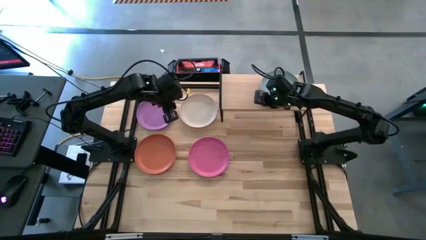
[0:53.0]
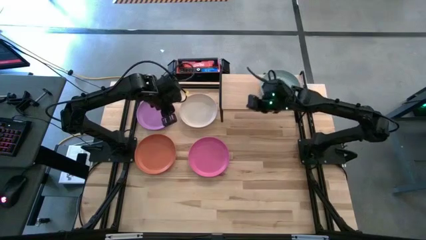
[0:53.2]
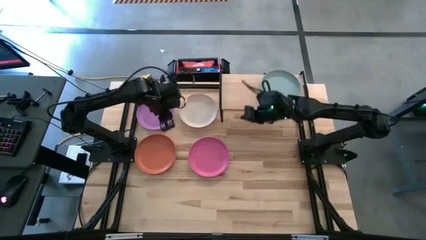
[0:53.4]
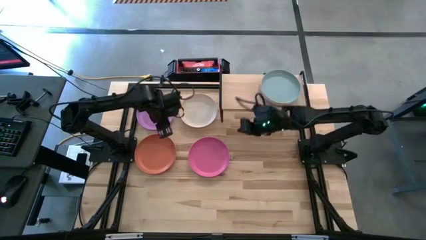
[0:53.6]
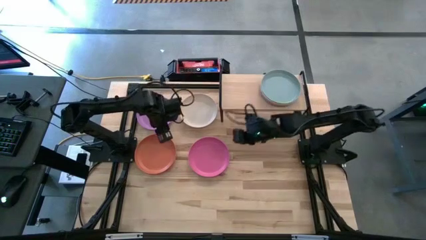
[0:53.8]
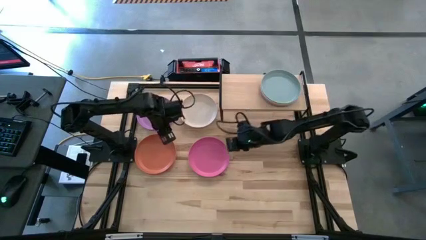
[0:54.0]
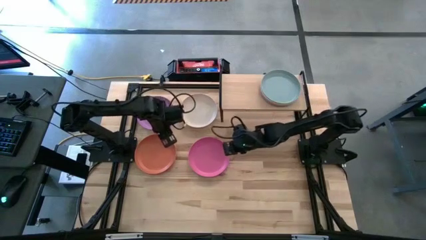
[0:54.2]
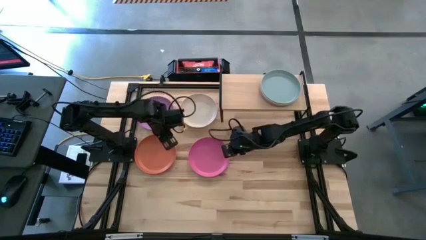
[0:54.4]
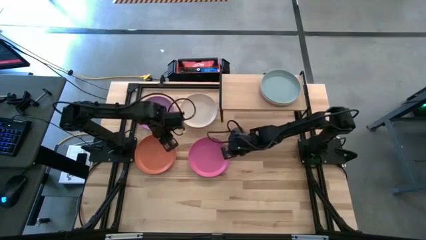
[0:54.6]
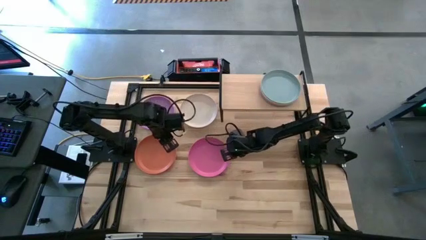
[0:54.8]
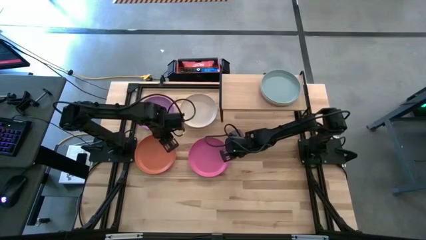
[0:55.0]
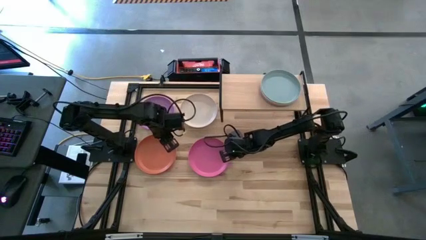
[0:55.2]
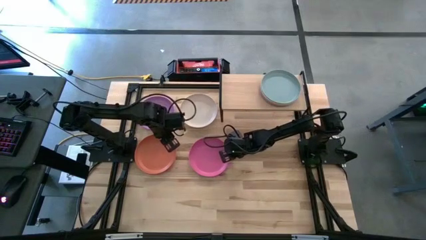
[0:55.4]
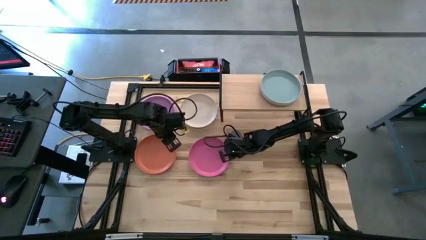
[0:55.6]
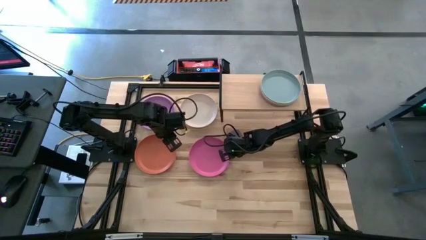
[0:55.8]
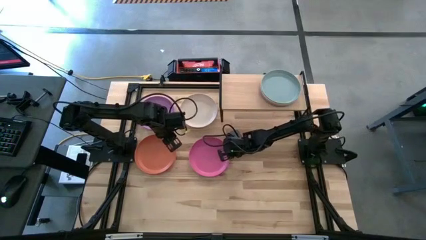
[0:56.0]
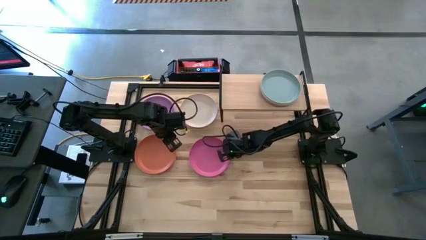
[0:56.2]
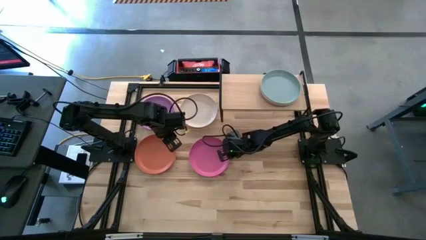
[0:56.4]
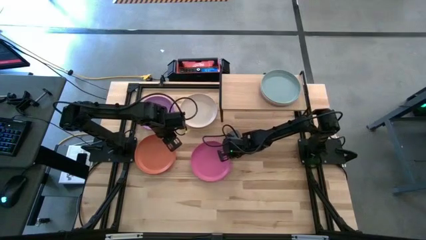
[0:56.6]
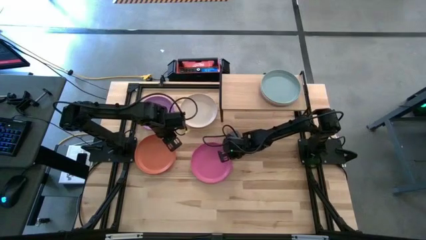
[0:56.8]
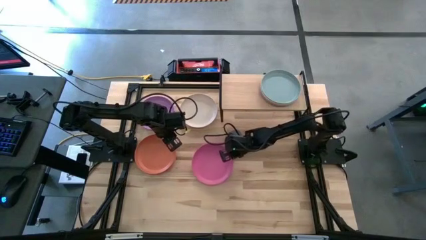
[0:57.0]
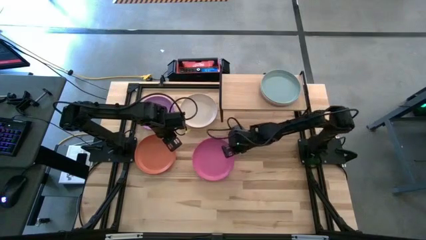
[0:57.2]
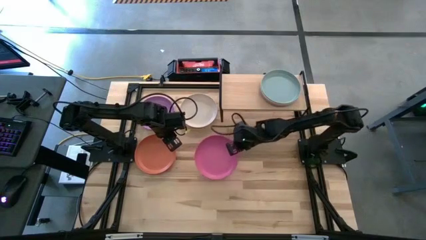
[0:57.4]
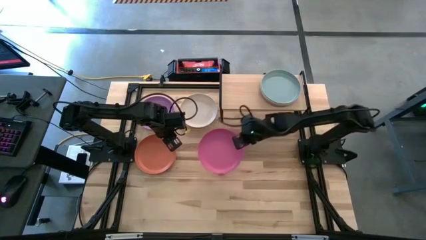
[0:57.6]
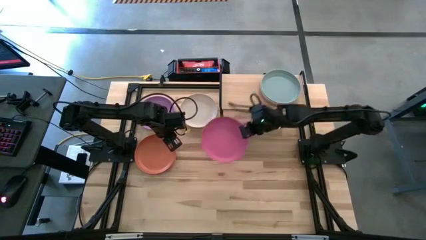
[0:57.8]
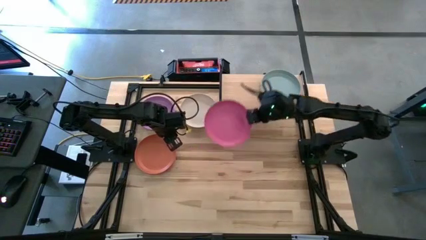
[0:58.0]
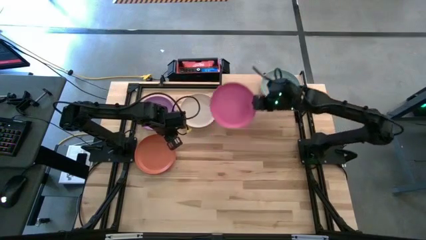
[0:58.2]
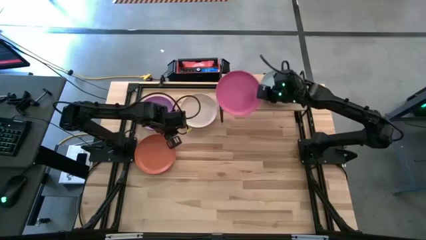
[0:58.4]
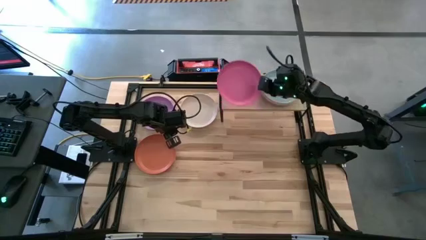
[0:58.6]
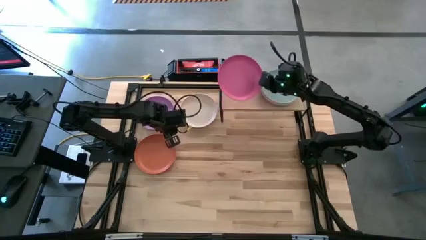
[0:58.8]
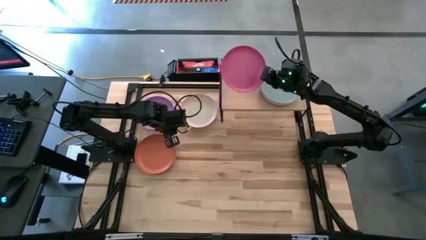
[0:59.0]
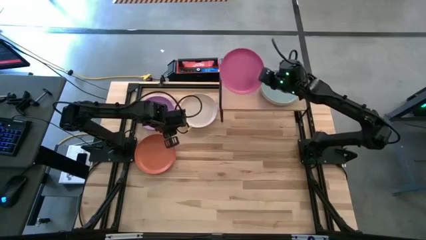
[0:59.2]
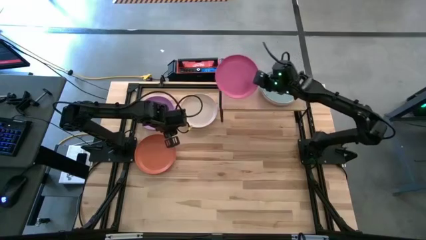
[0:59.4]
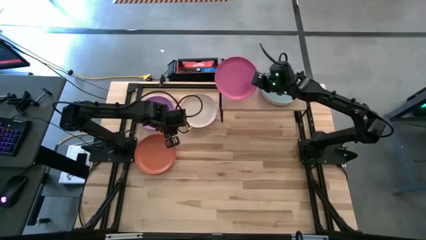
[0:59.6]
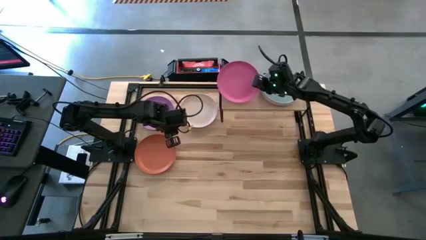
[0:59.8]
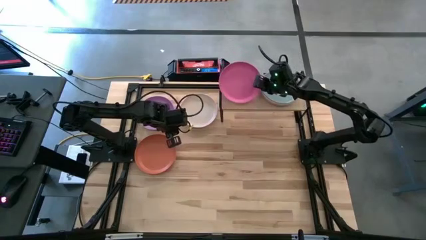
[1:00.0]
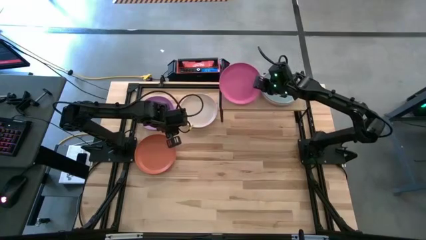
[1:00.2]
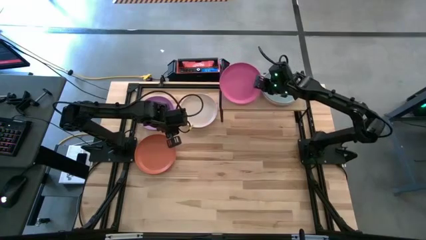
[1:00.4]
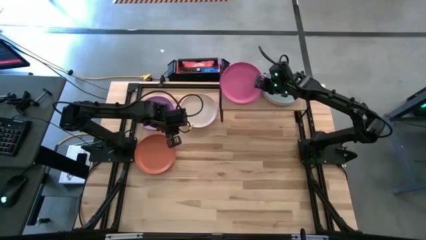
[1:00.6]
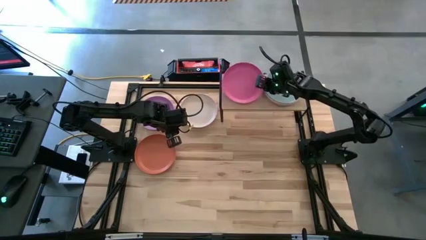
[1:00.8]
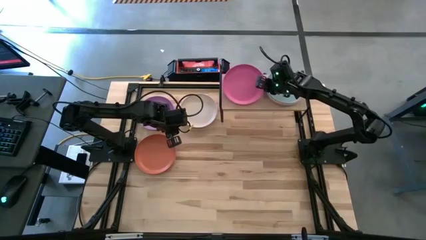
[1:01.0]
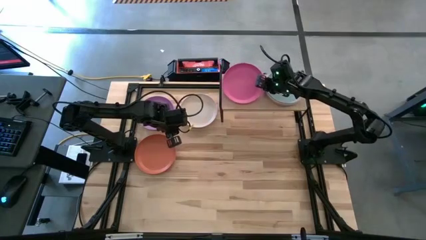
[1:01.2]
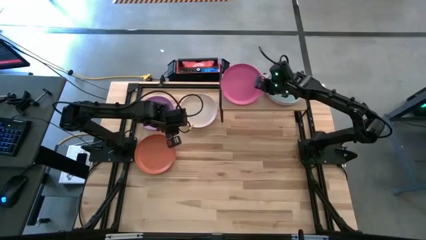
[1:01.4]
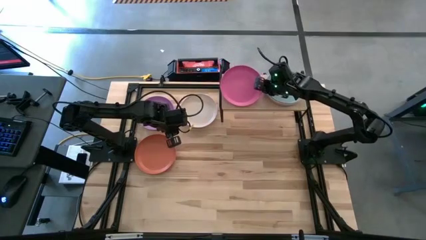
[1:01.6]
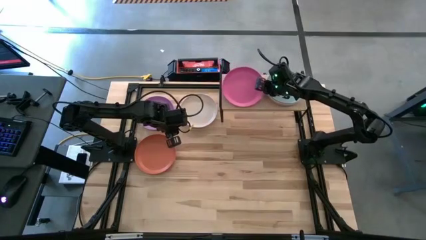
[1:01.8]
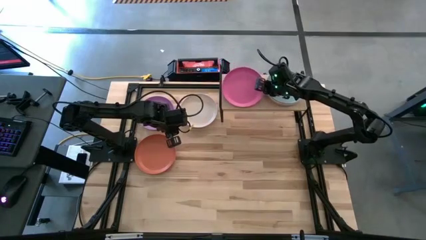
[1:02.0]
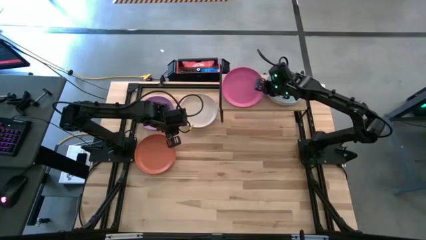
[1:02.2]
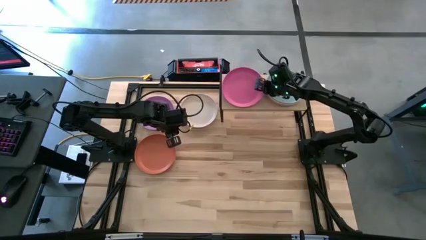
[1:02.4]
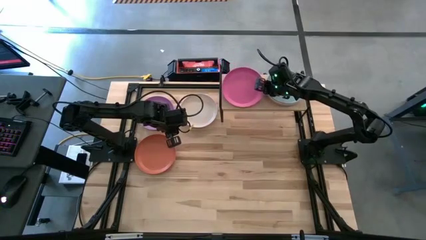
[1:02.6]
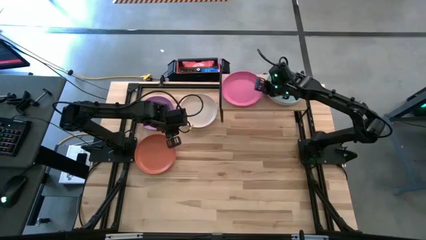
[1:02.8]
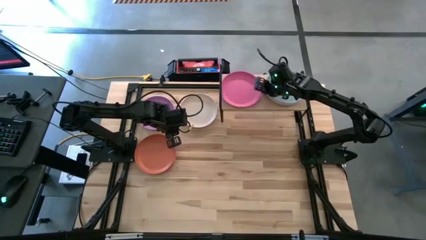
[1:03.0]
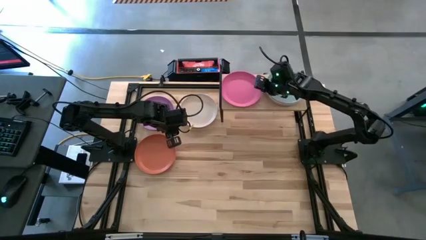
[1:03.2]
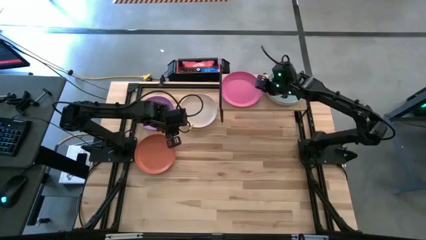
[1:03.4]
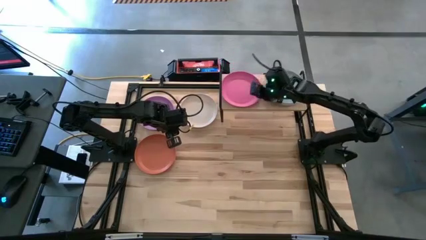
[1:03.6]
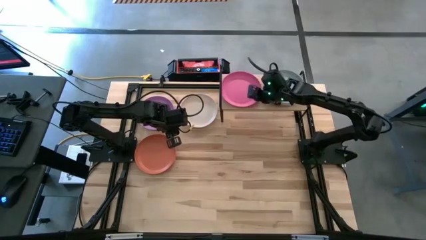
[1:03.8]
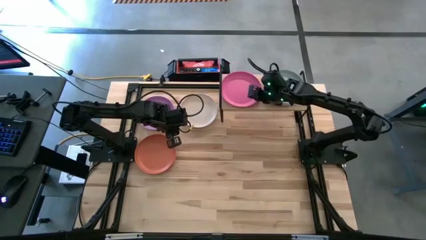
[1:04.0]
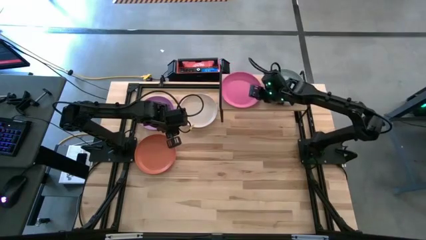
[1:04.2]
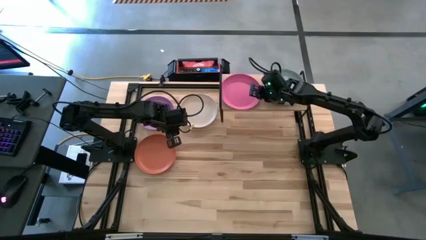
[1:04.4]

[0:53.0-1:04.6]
Task: Place and stack plates onto a shelf
Put the pink plate on the shelf

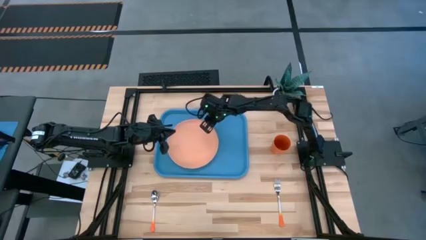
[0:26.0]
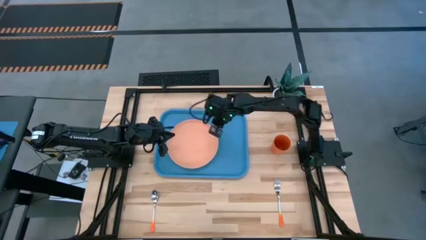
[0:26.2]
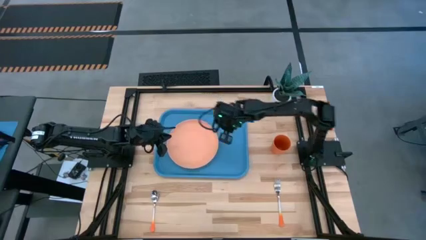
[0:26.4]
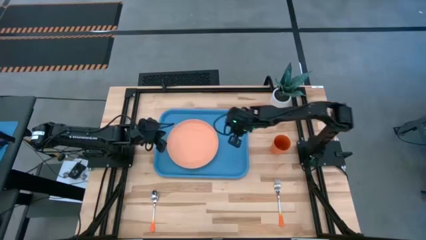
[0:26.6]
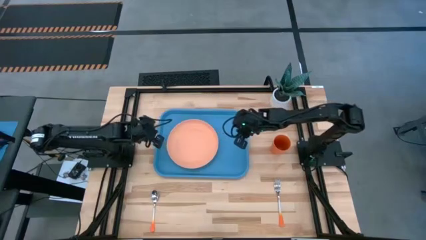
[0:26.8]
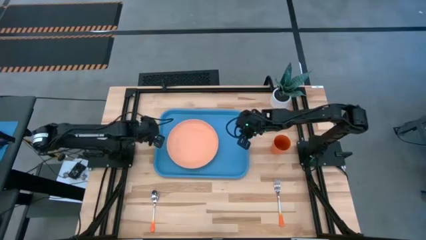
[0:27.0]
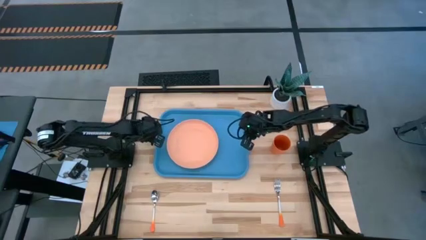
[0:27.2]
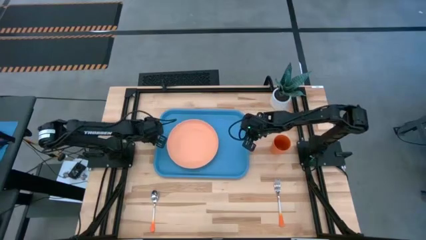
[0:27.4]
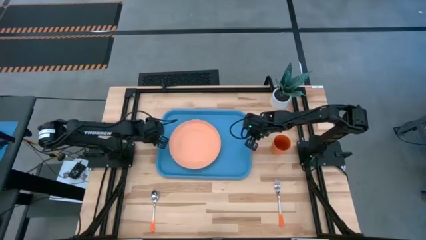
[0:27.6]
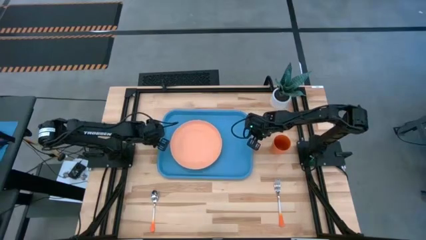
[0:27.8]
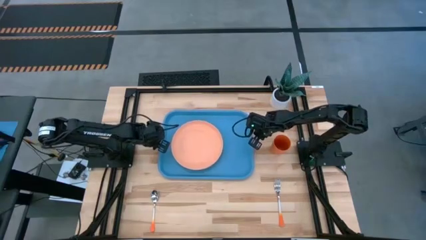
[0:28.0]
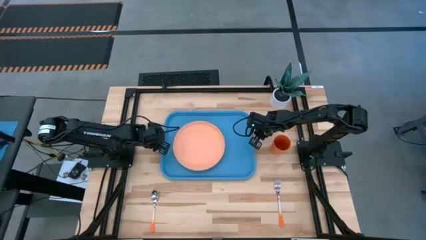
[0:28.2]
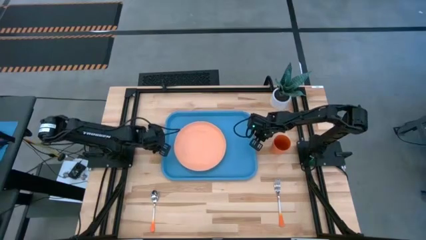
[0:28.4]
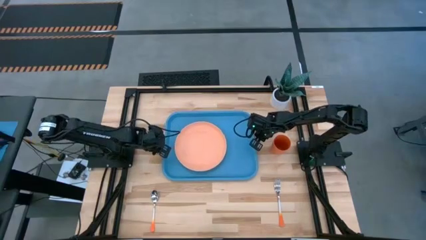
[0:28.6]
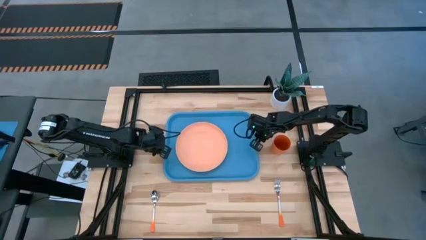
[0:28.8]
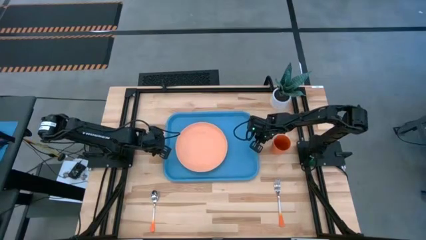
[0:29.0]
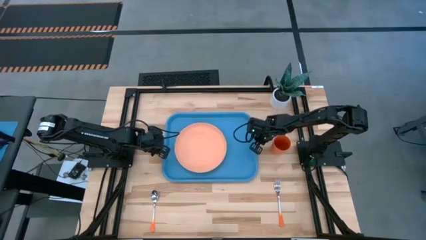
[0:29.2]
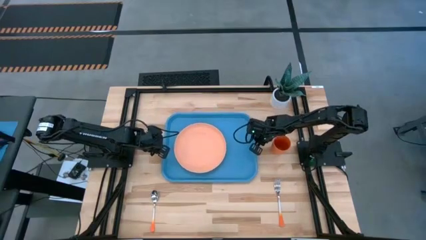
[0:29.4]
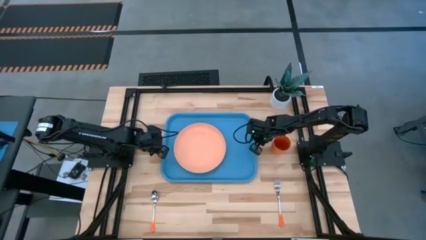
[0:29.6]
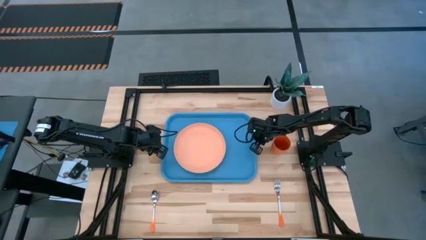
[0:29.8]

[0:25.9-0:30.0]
Task: Pick and place plate/cup/fork/spoon on tray
Adjust the blue tray on the table
